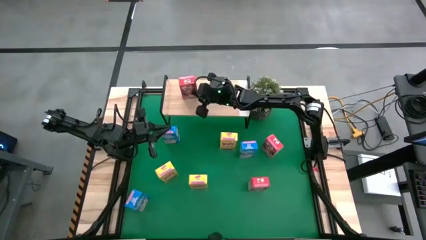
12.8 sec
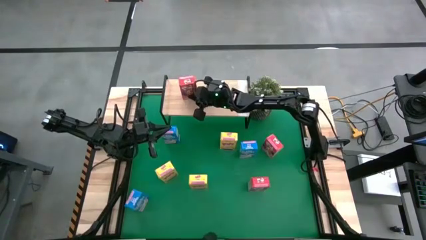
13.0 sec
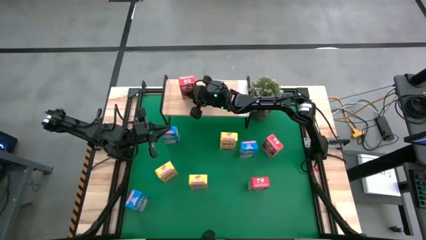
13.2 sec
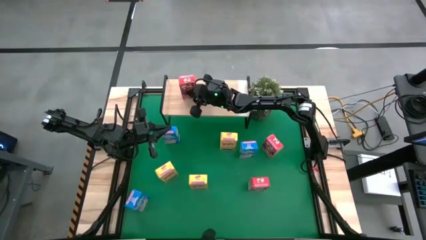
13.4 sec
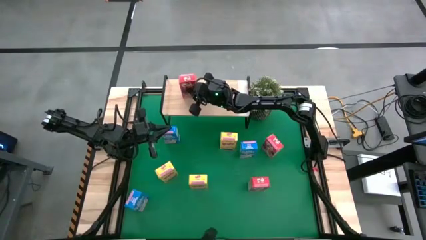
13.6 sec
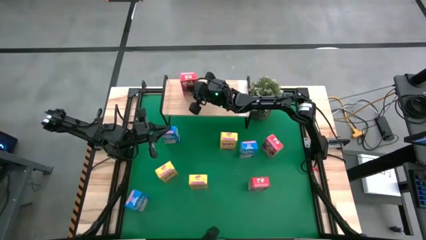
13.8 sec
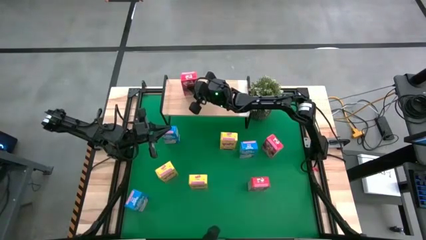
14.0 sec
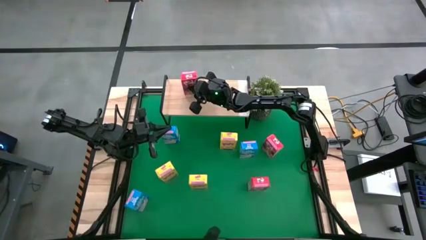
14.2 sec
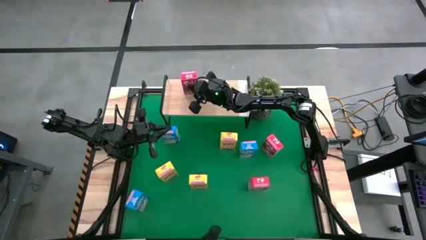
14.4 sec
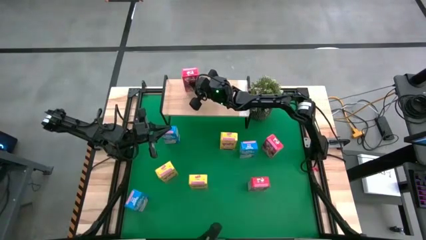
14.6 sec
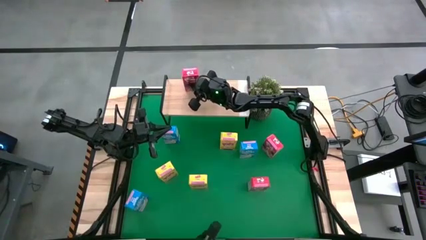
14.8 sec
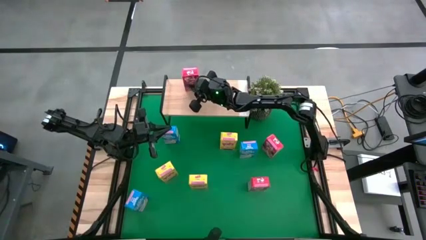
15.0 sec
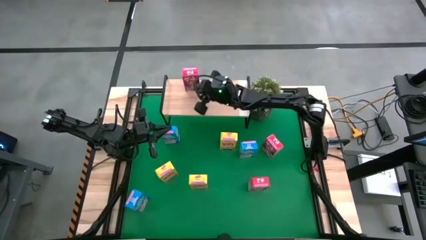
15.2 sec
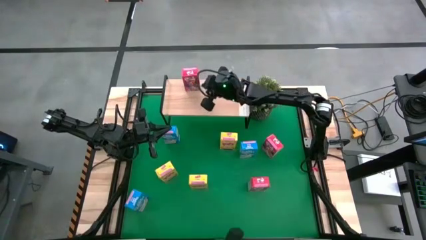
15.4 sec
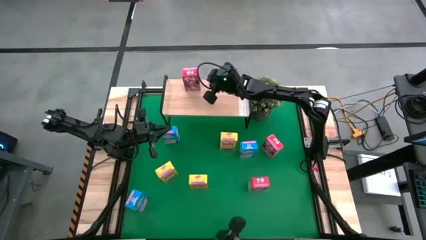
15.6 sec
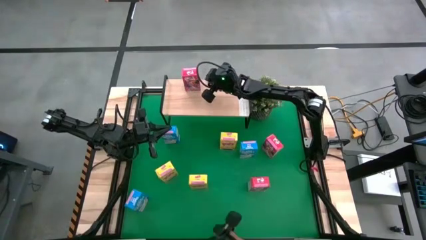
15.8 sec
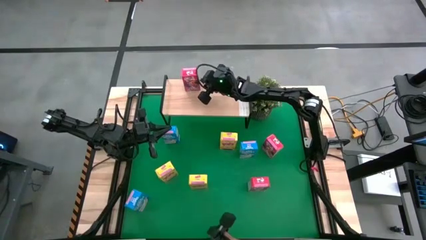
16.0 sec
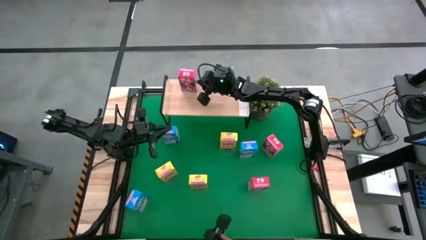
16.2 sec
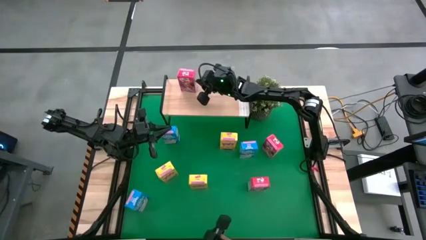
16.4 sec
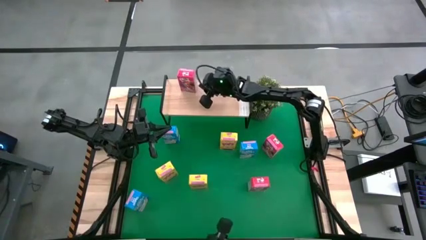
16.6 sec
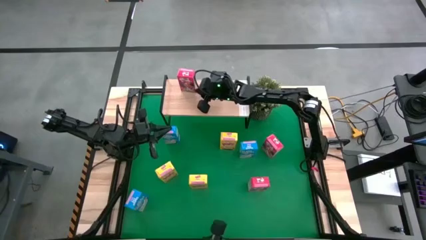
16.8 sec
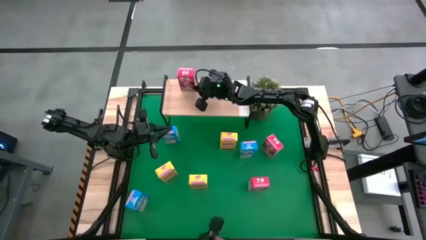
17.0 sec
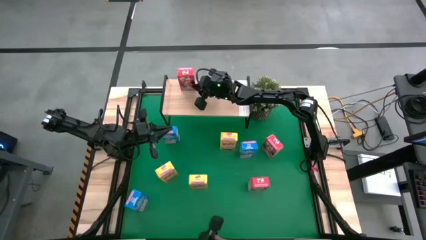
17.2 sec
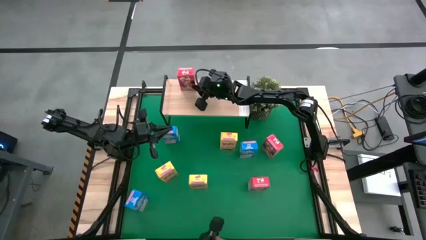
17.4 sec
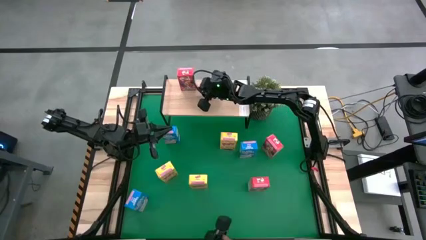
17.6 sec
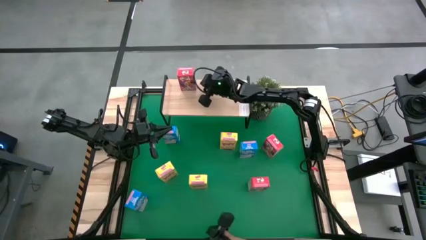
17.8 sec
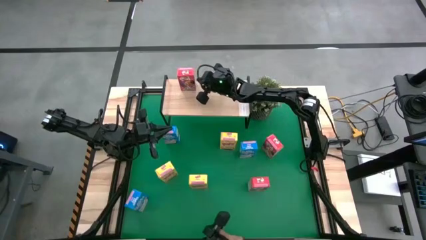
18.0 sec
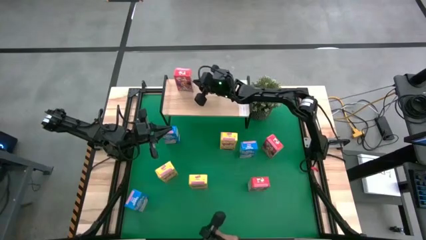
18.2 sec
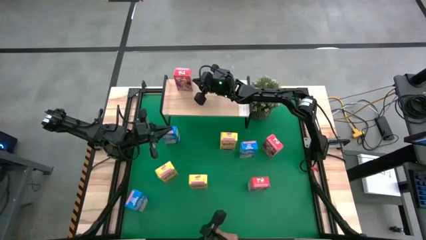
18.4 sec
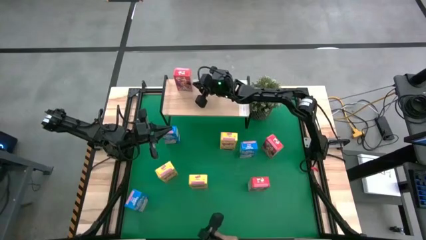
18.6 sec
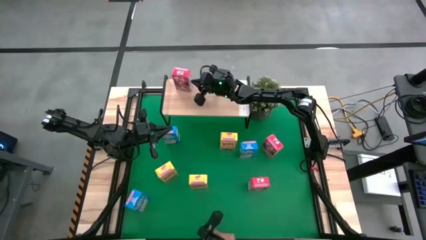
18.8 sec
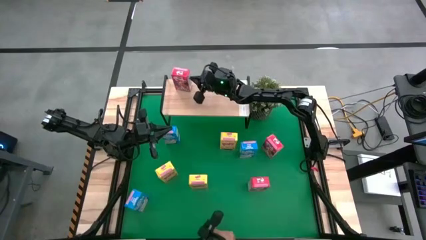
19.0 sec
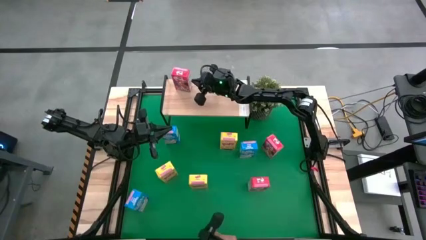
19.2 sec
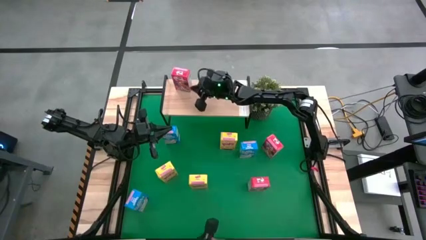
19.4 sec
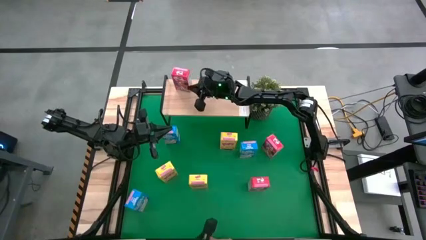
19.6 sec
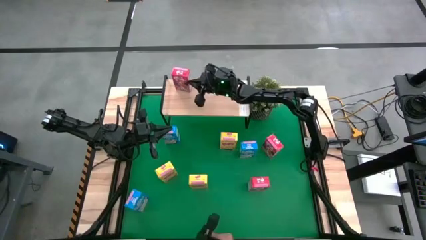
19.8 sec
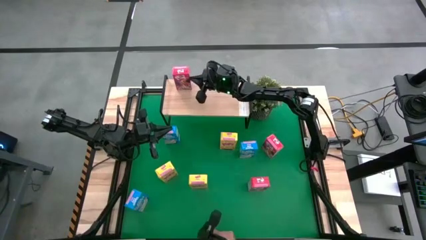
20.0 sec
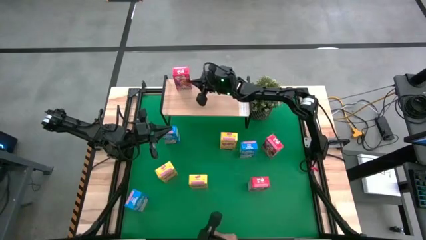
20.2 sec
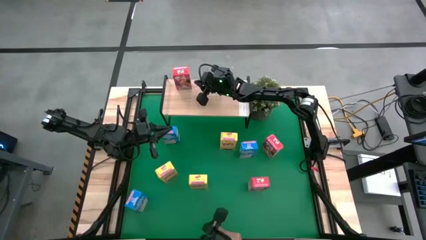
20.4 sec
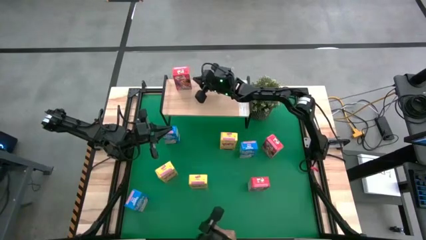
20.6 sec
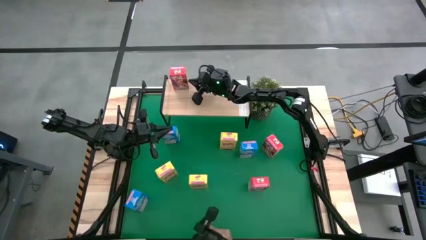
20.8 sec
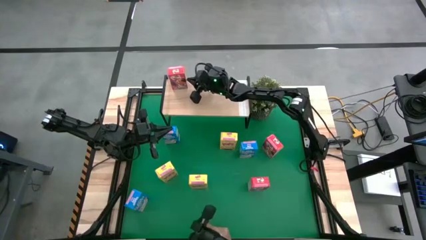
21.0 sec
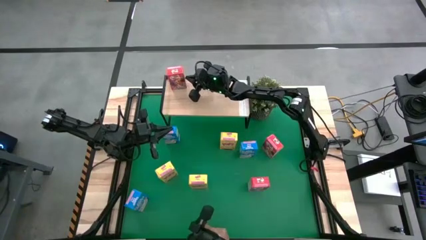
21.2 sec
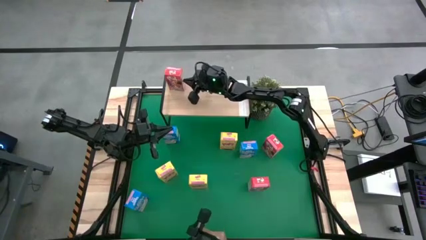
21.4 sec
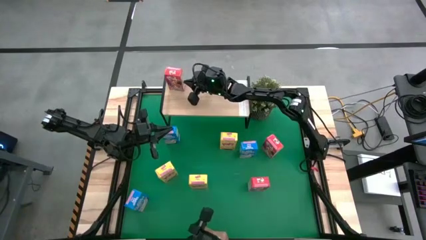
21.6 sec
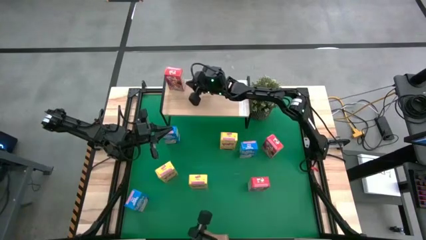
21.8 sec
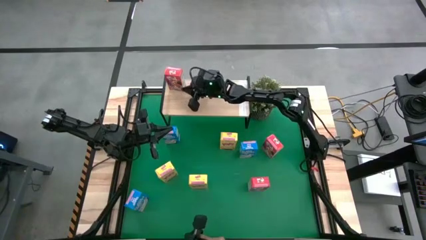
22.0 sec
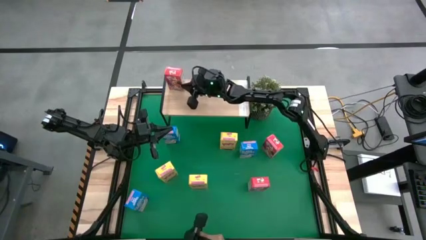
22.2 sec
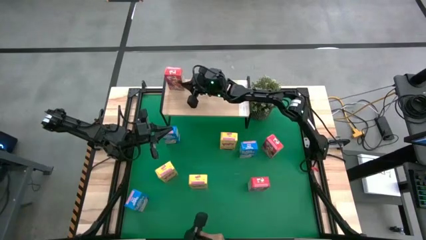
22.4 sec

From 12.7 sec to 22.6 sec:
Task: Stack cereal on shelf
Put the top left red cereal box on the shelf

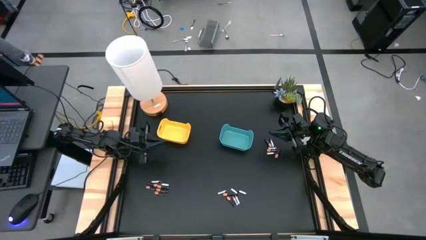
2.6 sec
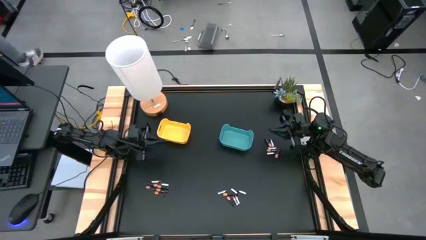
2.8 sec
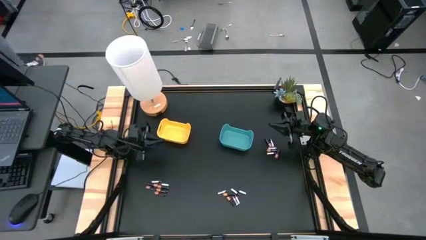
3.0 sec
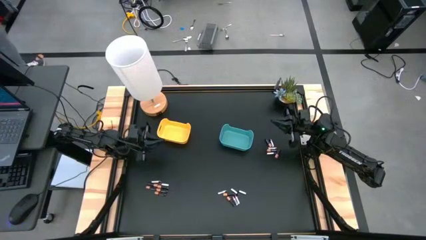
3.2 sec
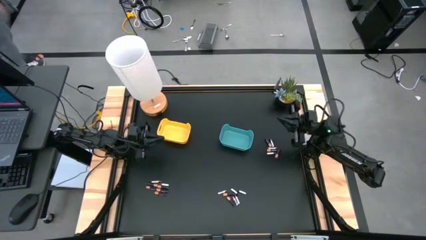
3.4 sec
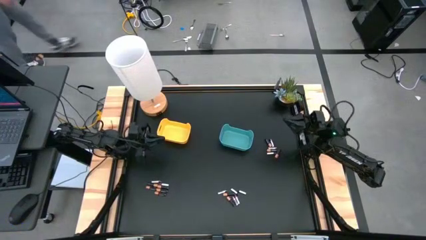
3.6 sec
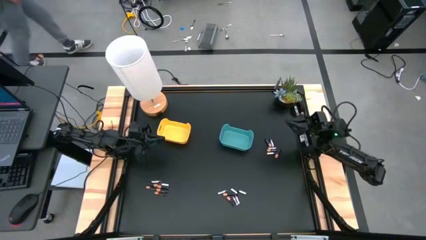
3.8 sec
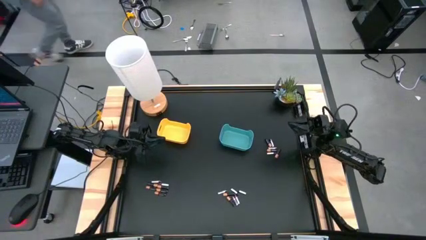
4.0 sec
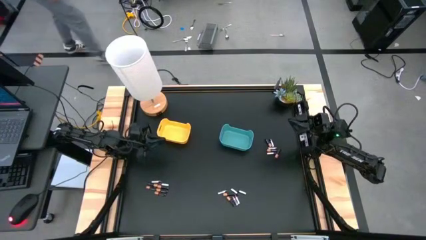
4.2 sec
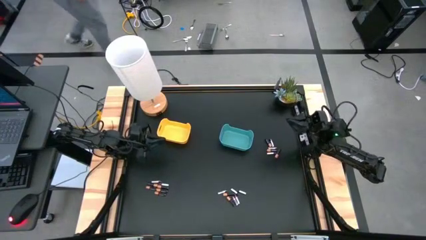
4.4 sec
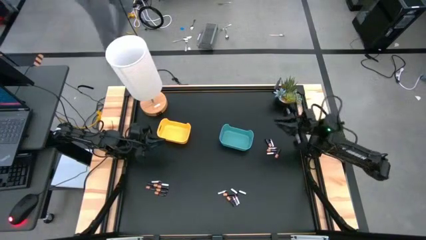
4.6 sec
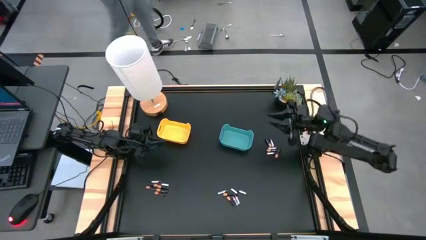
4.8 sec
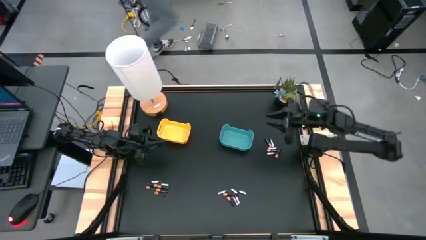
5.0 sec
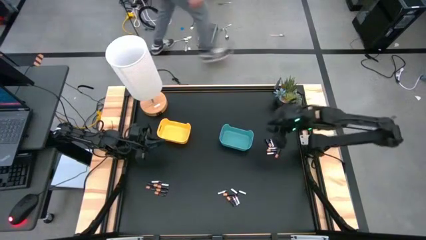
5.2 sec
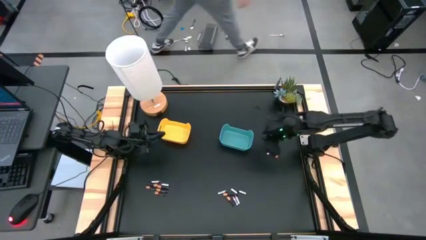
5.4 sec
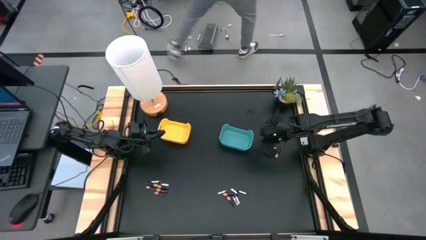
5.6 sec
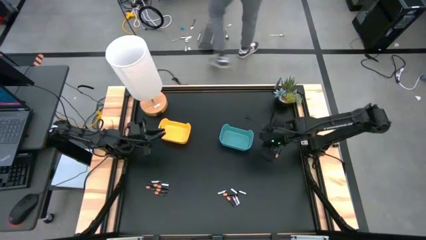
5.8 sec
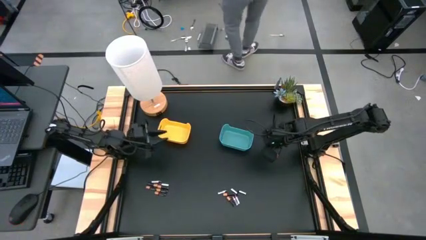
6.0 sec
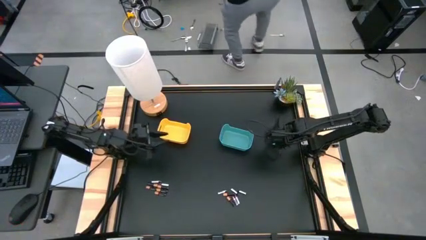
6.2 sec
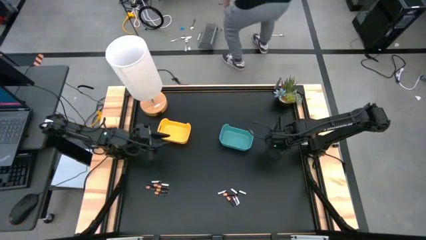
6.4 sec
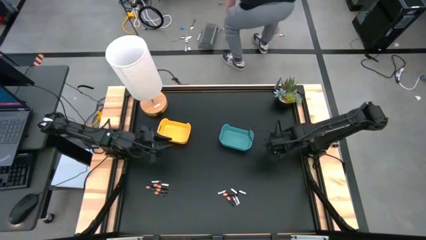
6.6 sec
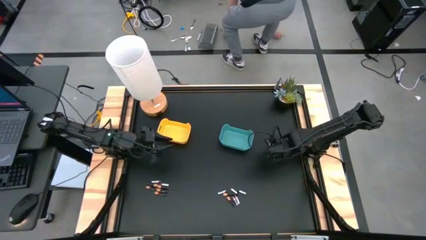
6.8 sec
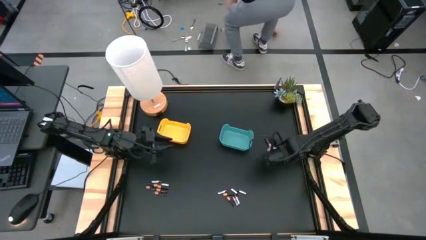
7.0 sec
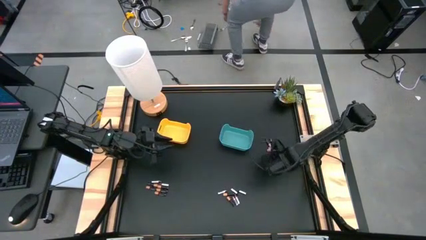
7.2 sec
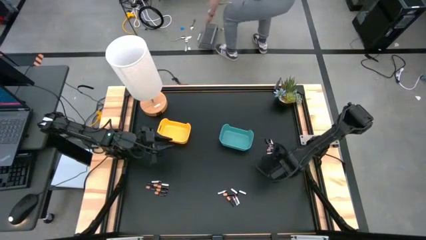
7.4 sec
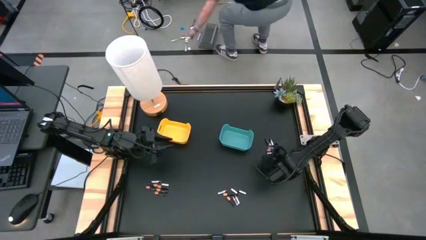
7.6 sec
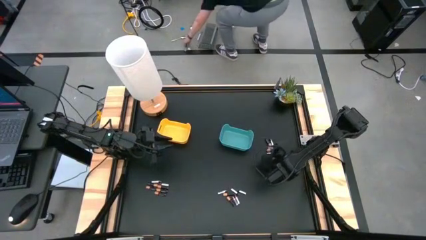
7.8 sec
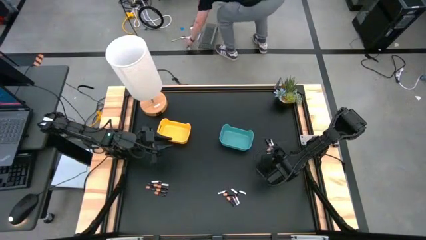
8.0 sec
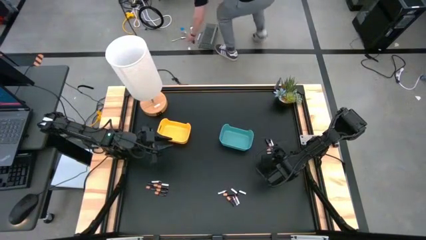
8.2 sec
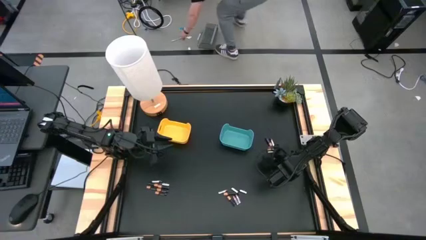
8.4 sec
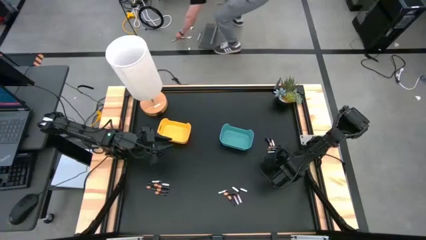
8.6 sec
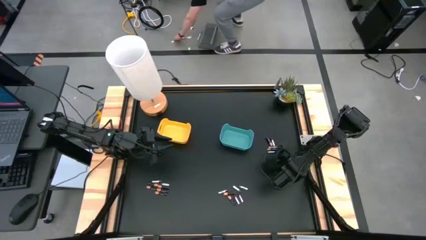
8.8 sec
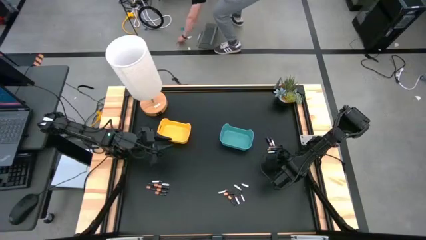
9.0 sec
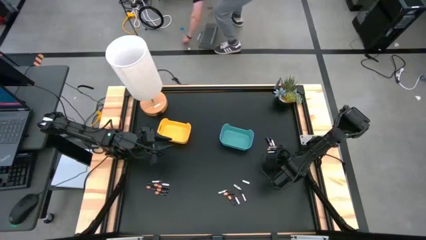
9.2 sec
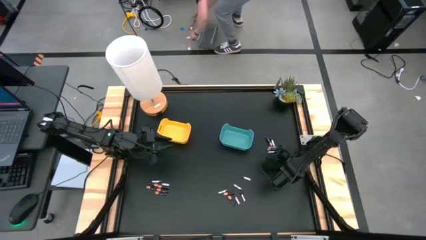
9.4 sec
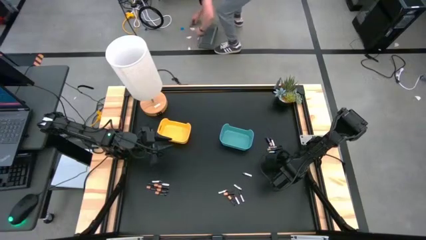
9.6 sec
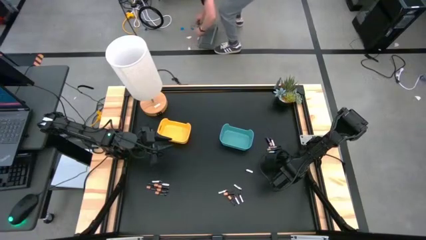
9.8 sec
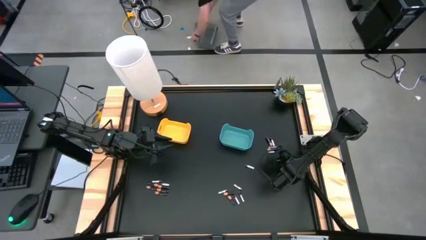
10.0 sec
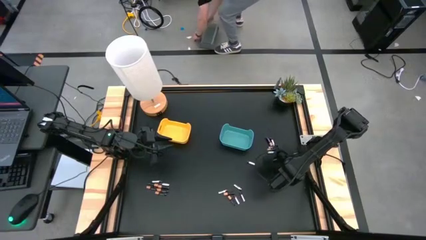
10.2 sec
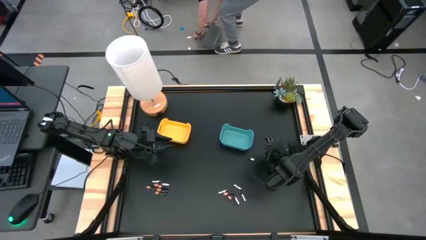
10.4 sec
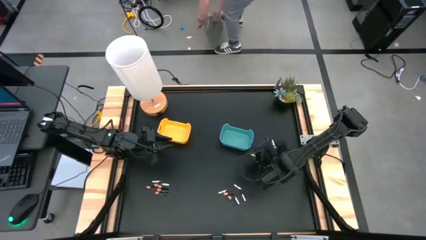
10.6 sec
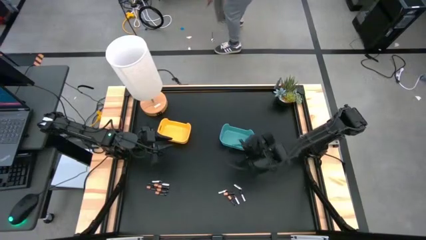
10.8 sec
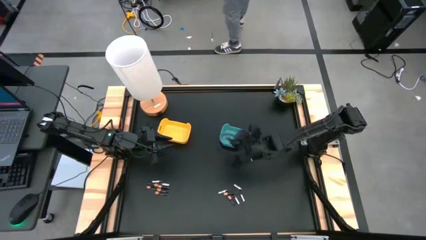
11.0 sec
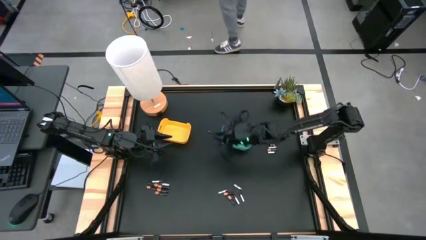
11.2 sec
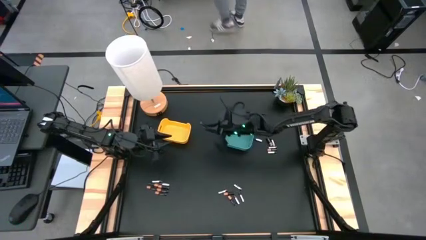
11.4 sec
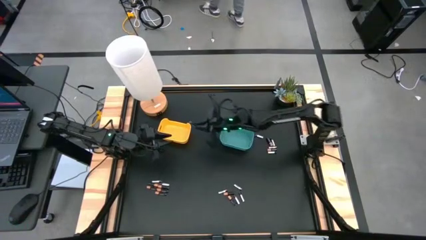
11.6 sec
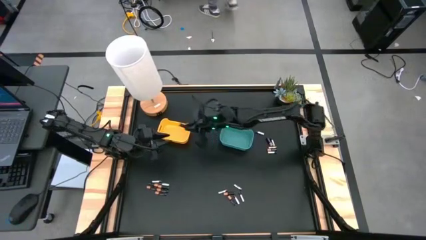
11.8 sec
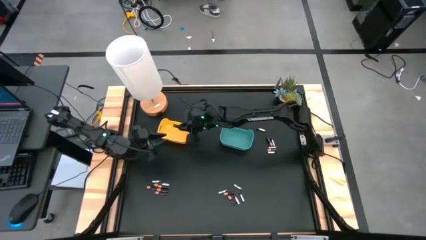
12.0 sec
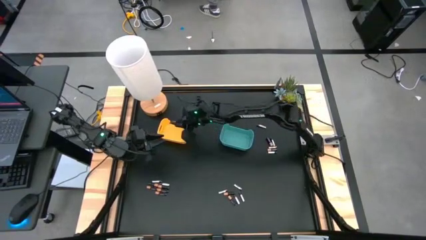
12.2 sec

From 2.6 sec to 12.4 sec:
Task: Sort batteries
Put the black battery into the yellow bin
